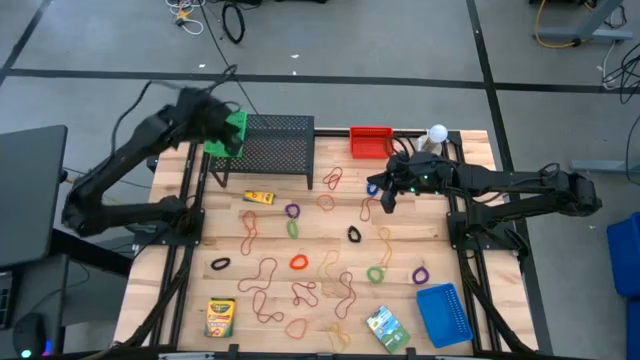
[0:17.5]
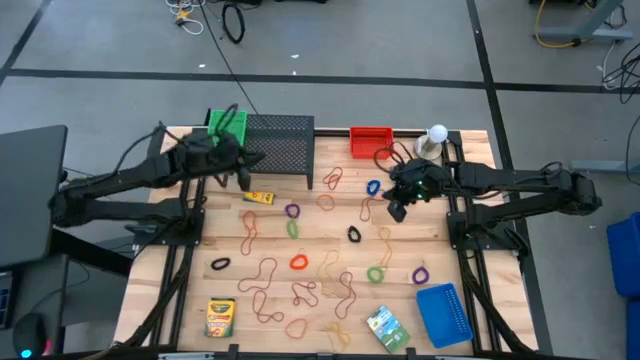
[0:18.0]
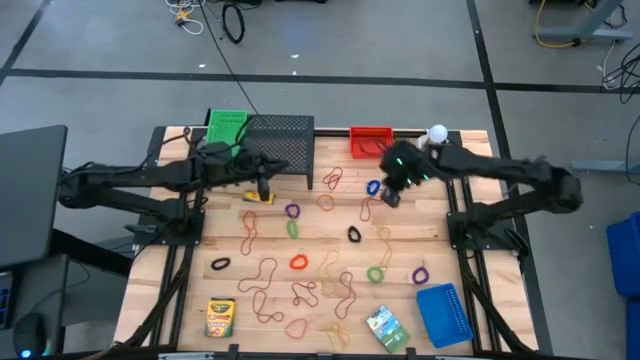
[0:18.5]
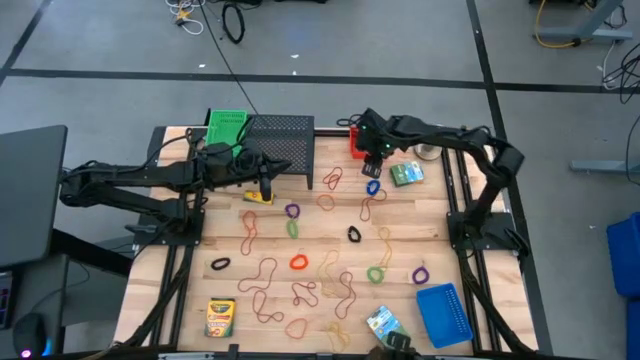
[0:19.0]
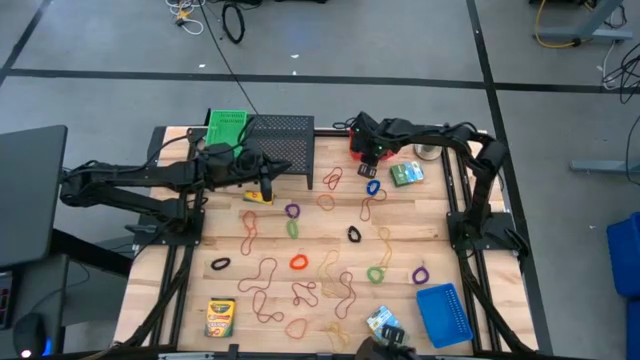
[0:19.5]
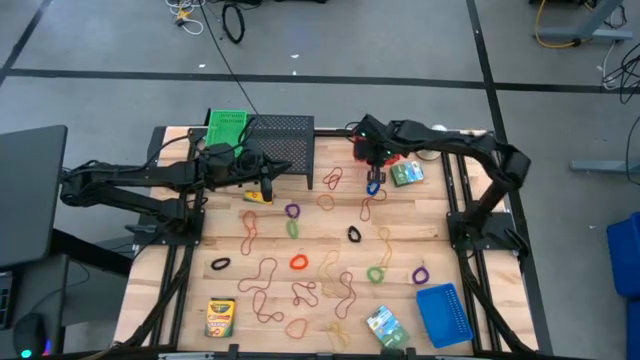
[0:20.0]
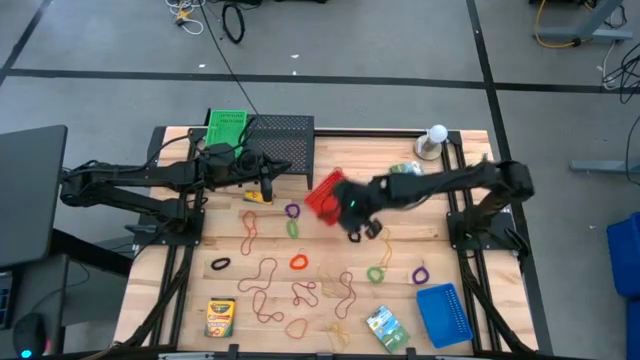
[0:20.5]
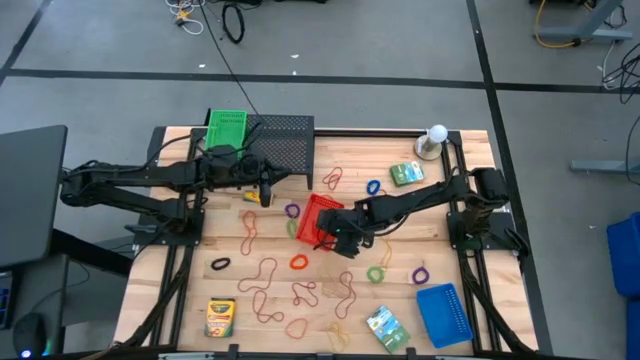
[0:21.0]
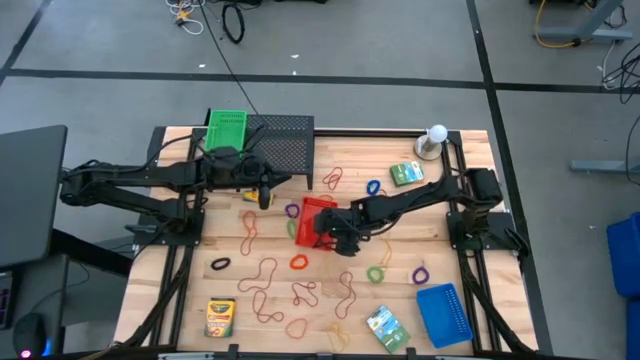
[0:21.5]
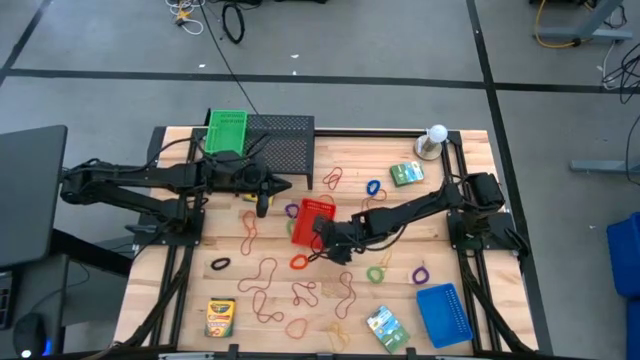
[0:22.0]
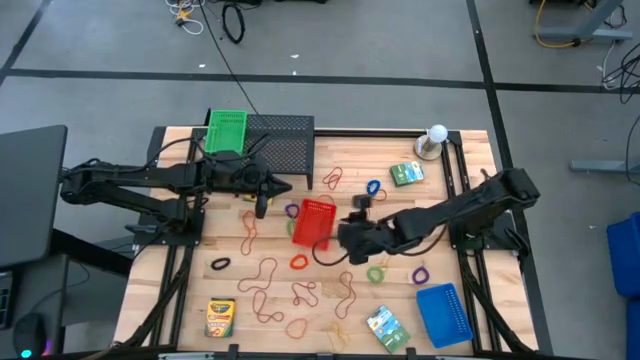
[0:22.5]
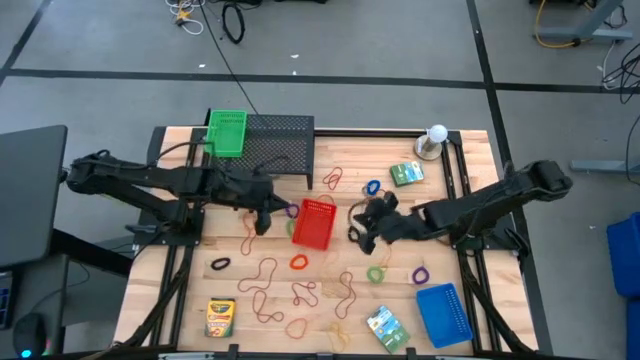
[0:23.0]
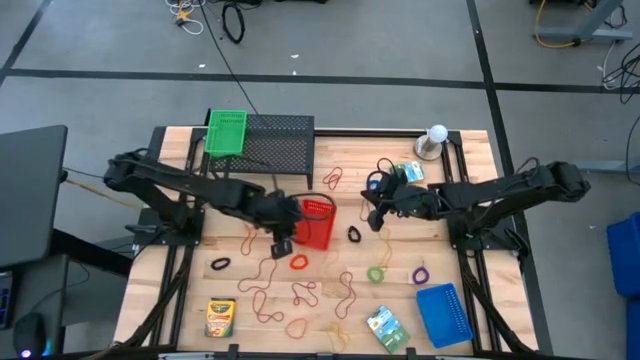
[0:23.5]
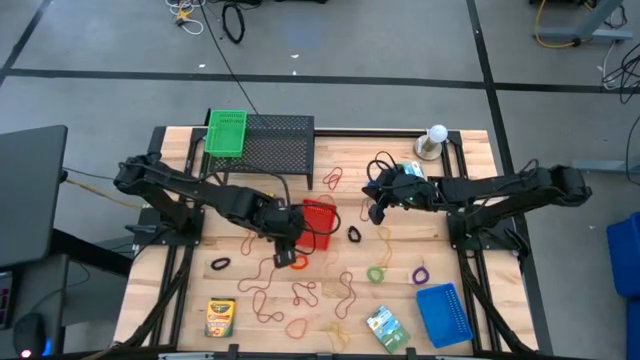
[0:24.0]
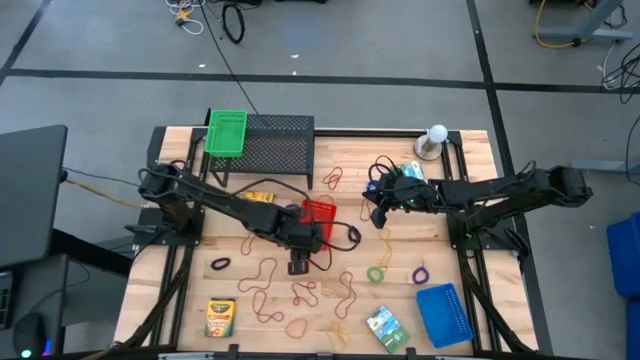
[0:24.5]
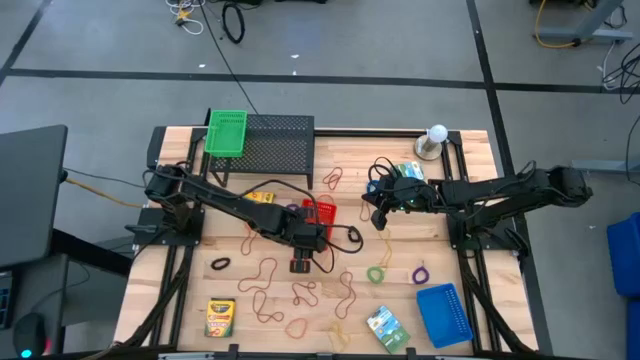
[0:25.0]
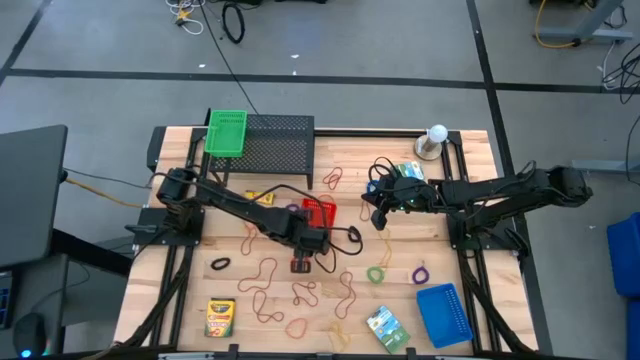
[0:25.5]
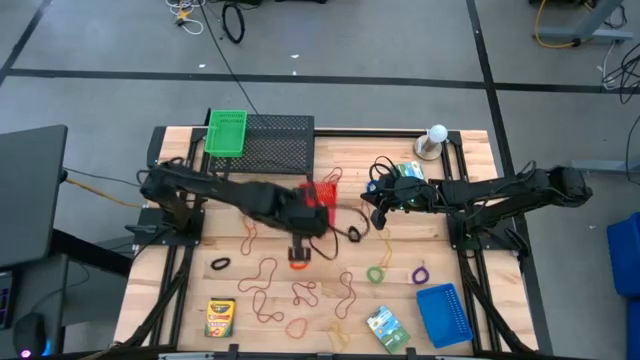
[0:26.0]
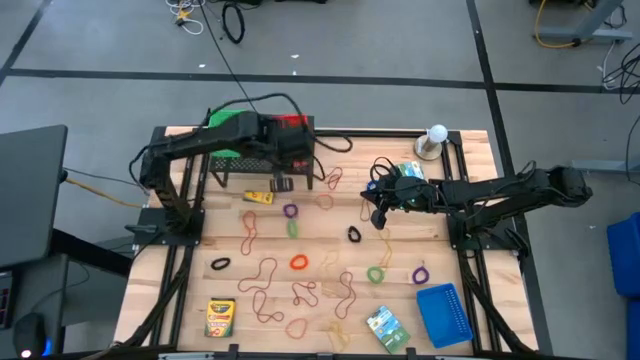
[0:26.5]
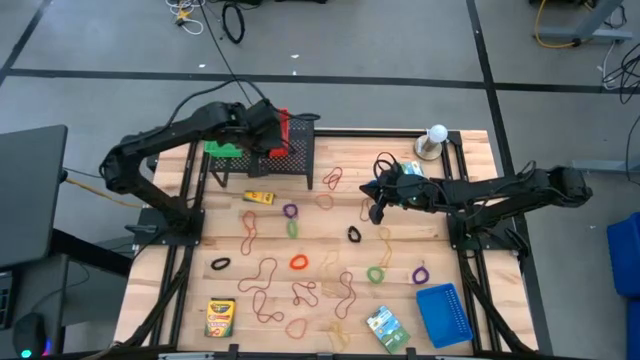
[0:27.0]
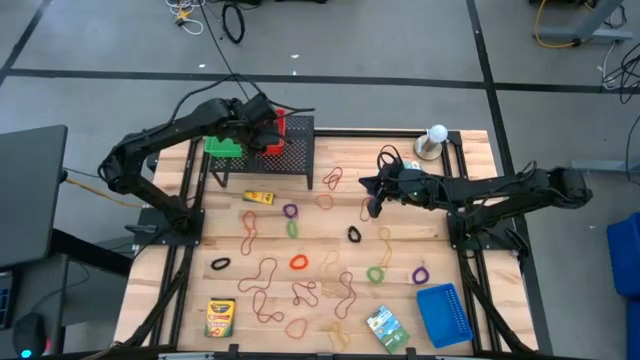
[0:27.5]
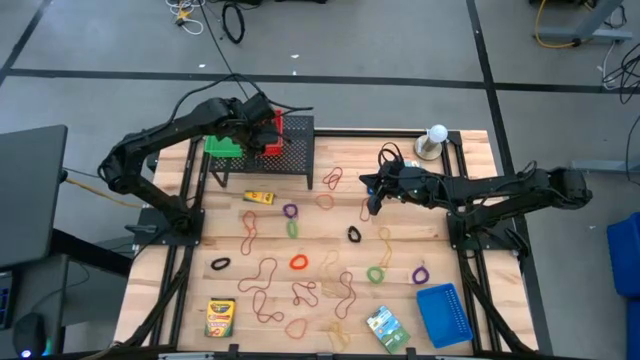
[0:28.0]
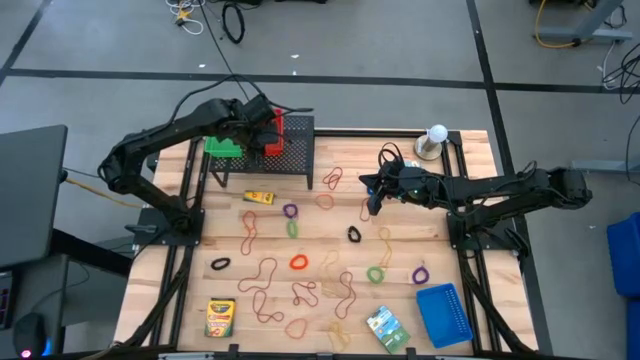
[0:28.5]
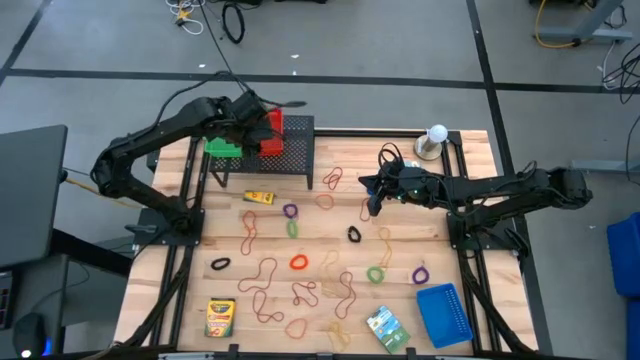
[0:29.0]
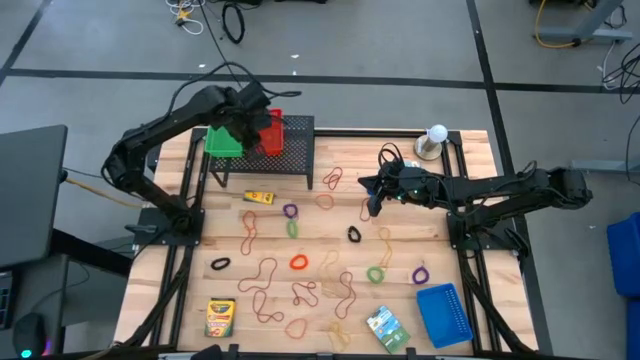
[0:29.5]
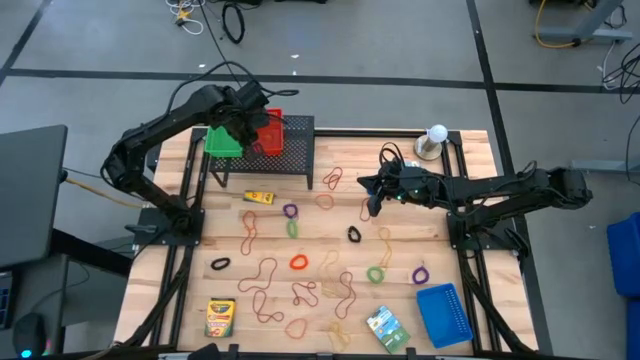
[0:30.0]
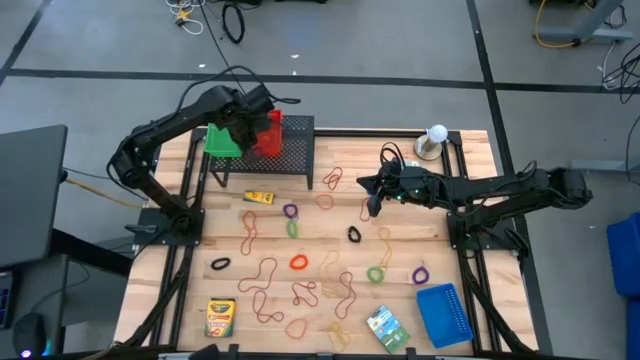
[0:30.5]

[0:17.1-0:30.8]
Task: Pick & Place Office Desk Supplies
Put the red bin on the shelf

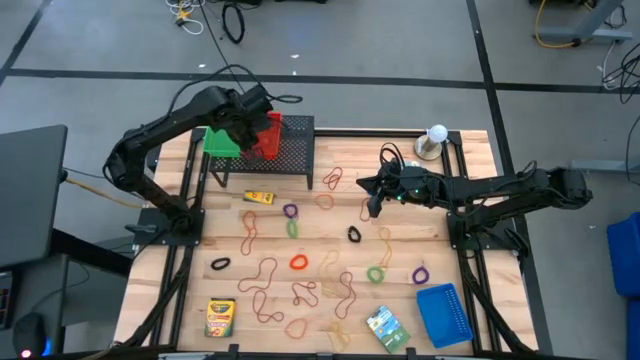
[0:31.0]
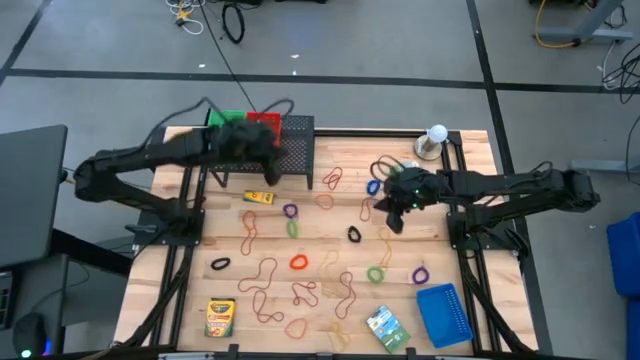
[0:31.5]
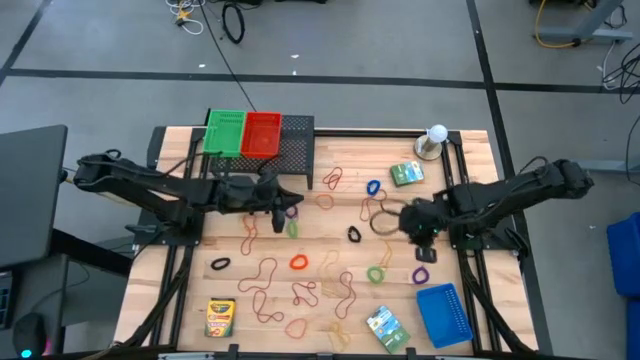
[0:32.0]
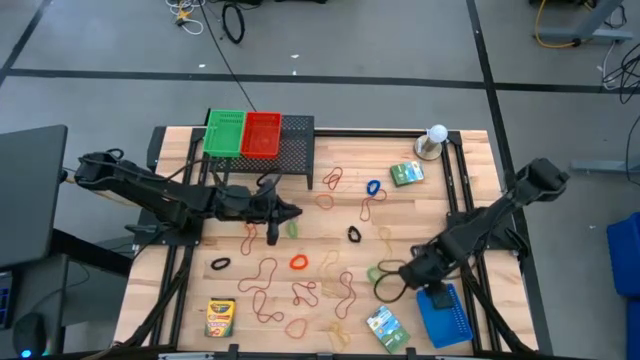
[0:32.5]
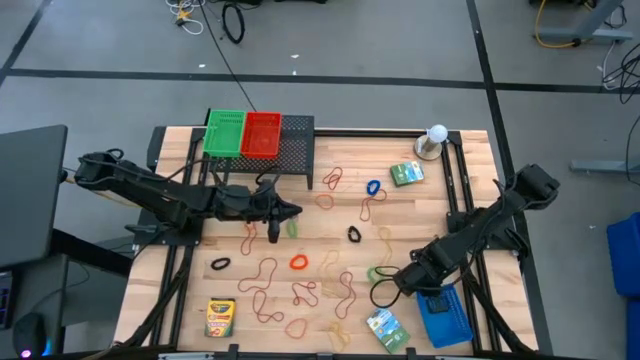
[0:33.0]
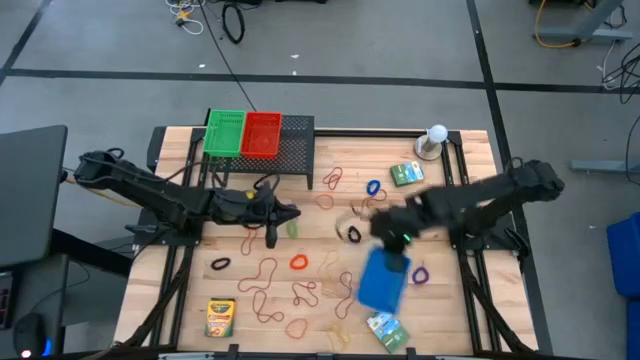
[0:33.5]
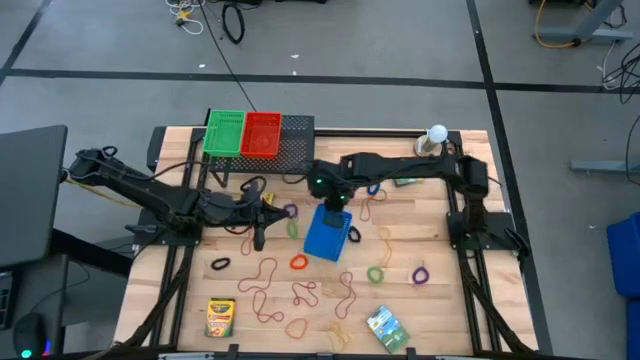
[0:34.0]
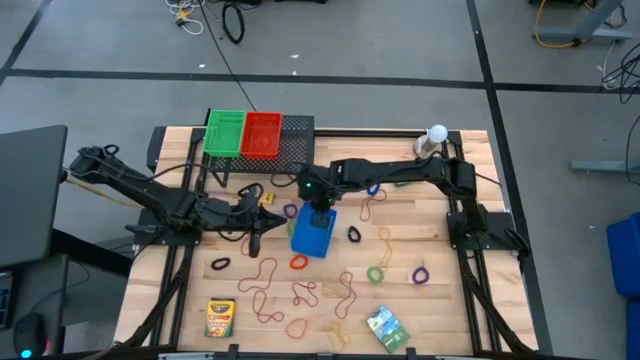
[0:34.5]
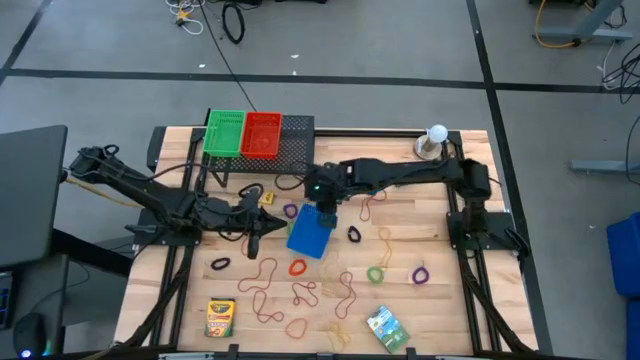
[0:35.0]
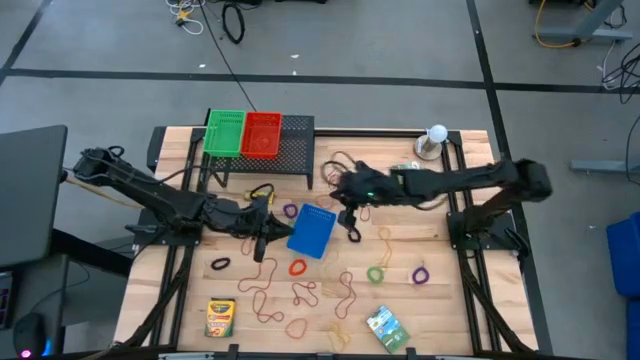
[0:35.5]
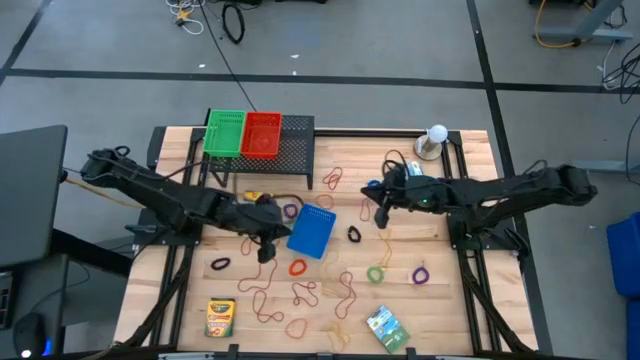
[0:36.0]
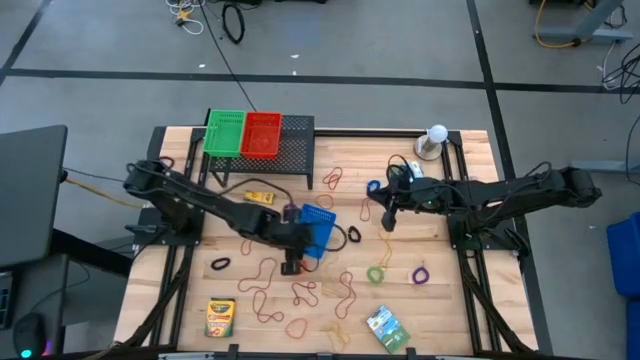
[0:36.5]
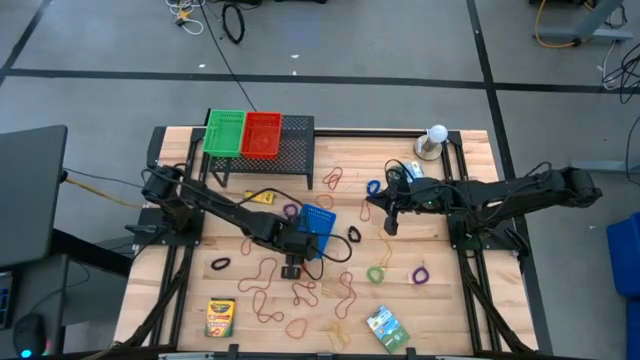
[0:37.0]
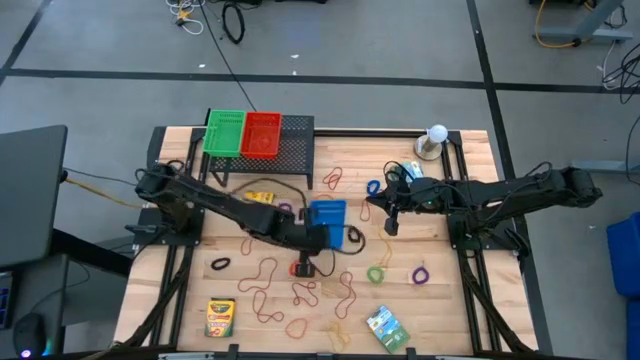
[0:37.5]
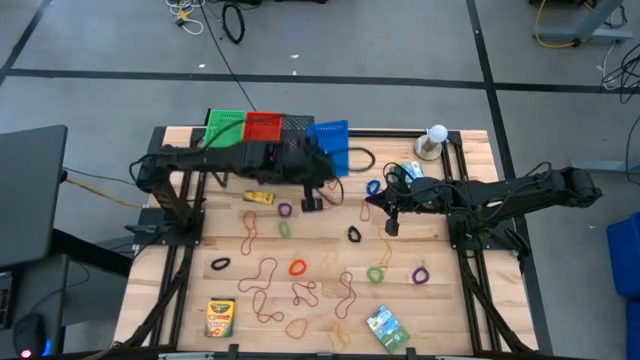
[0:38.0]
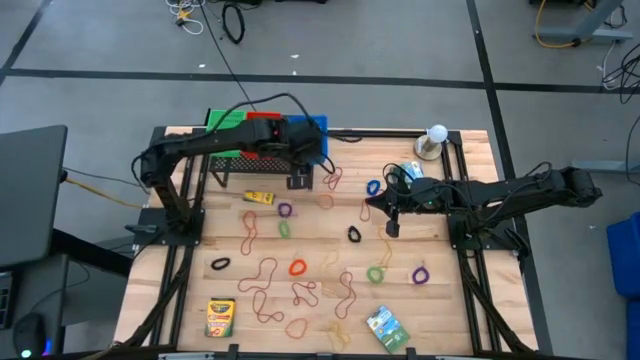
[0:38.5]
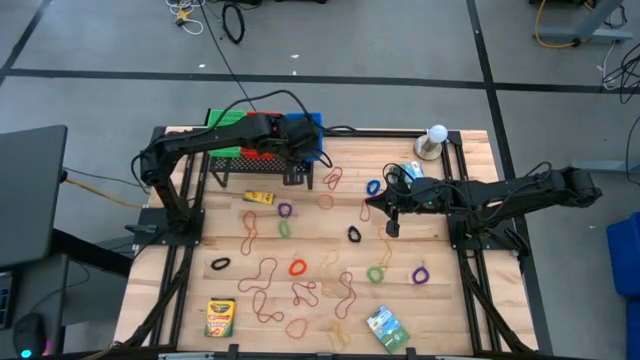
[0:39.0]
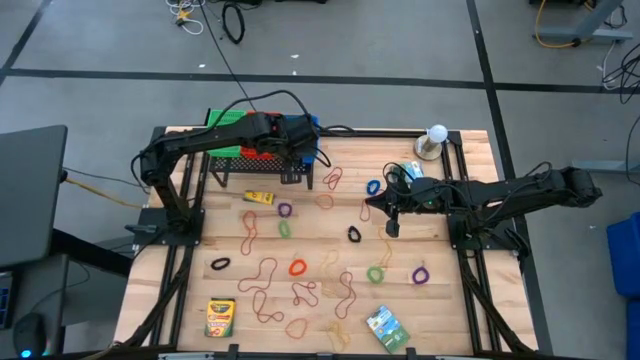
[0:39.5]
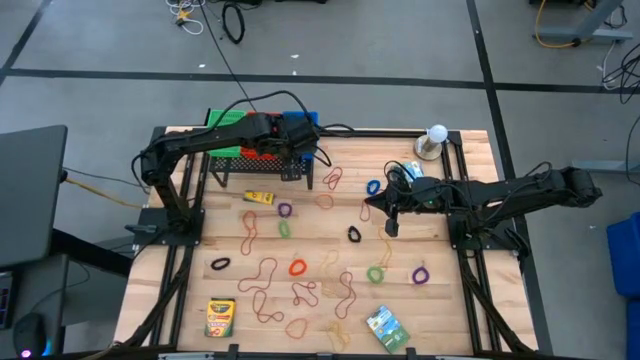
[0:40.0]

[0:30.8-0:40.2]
Put the blue bin on the shelf
